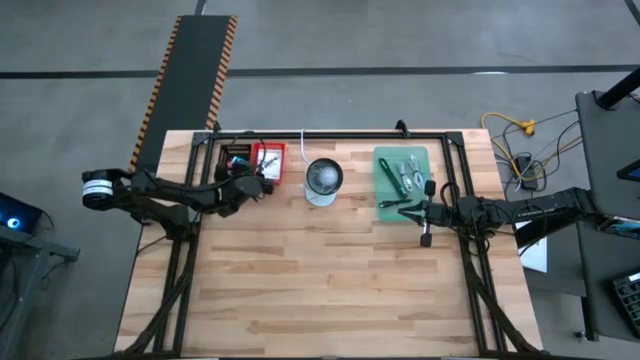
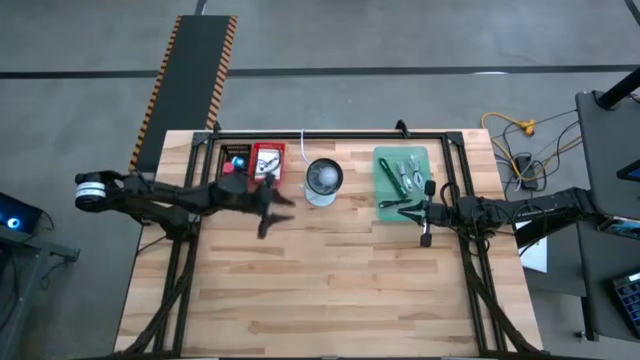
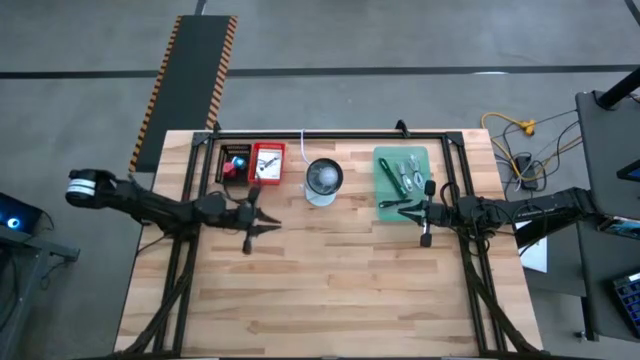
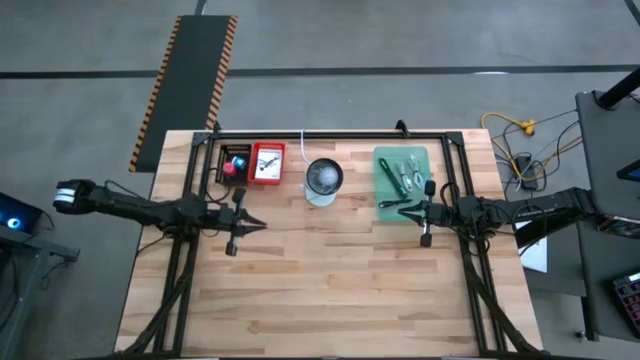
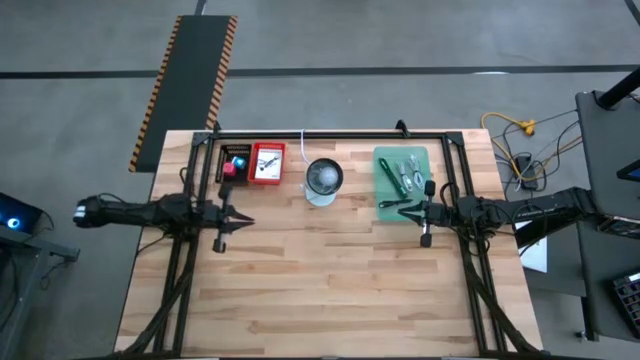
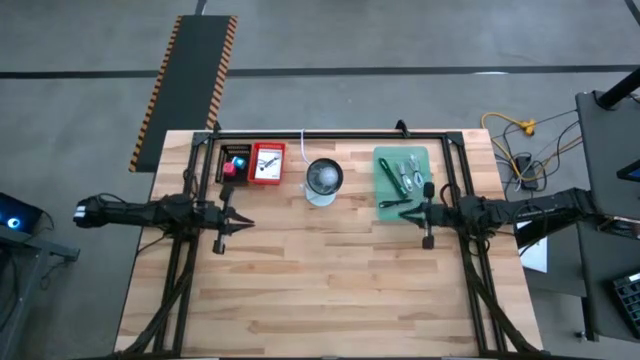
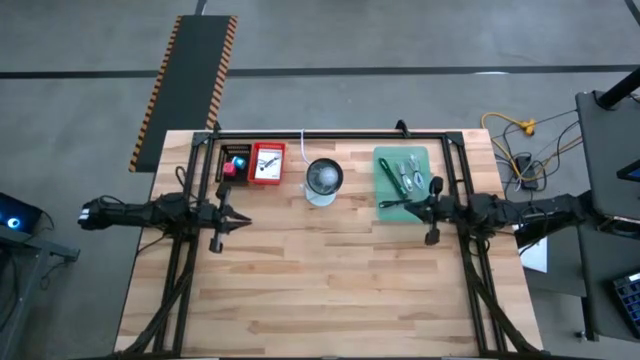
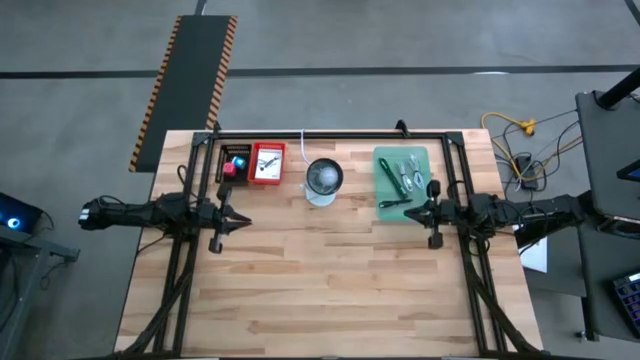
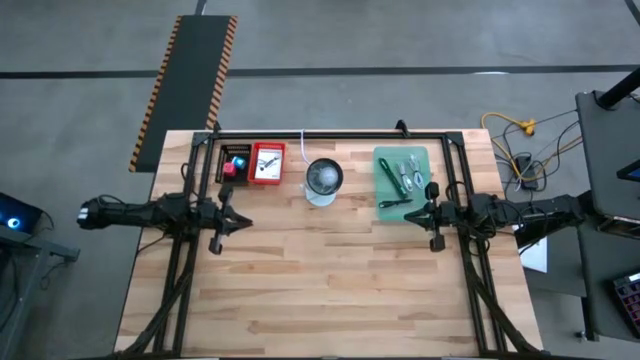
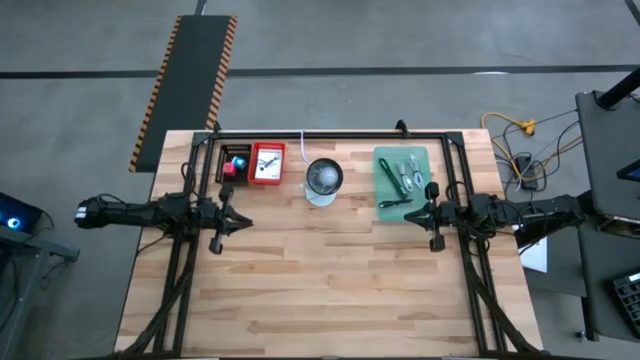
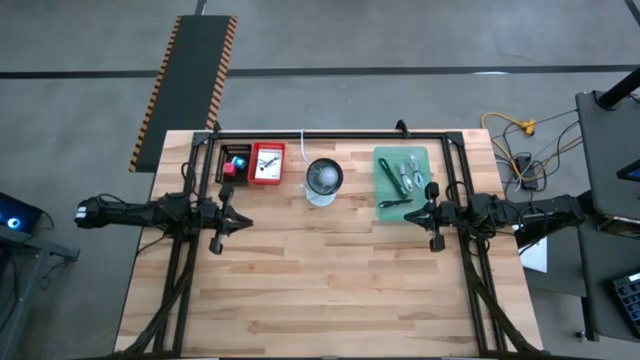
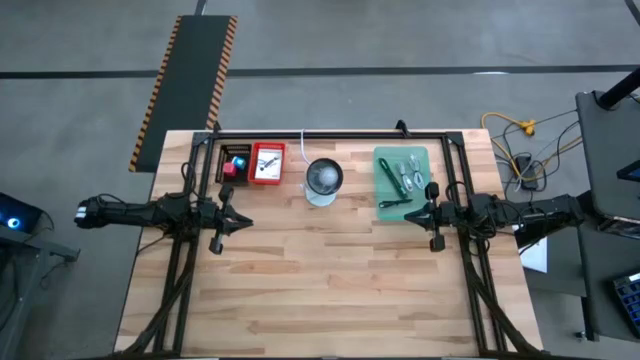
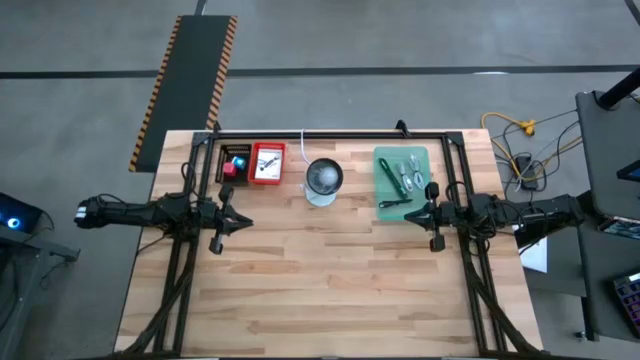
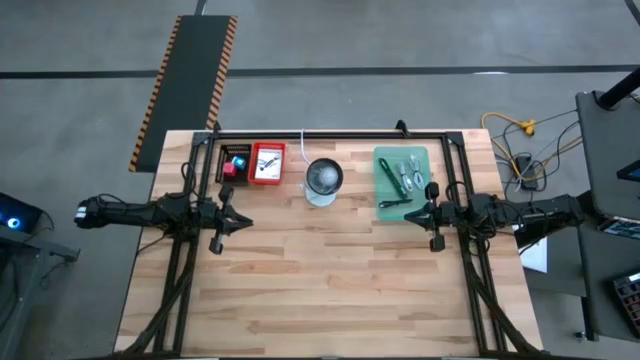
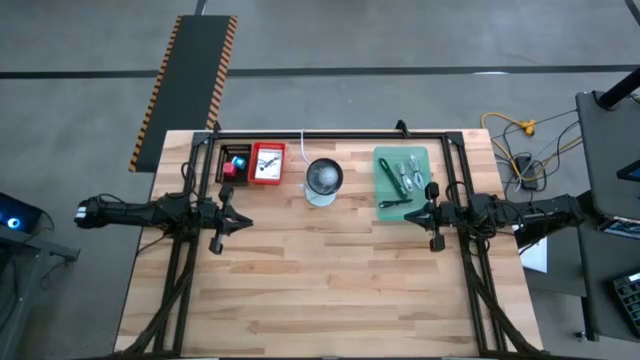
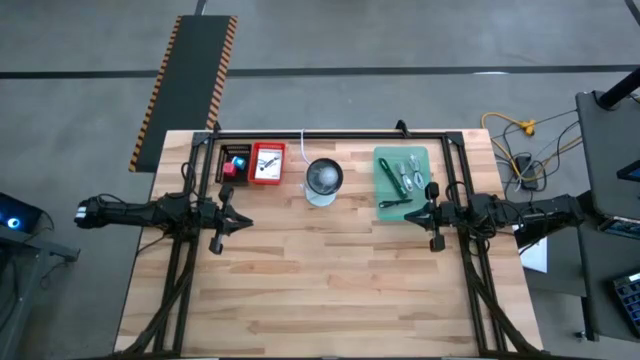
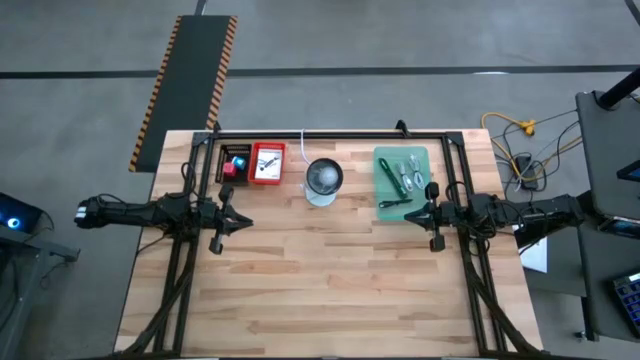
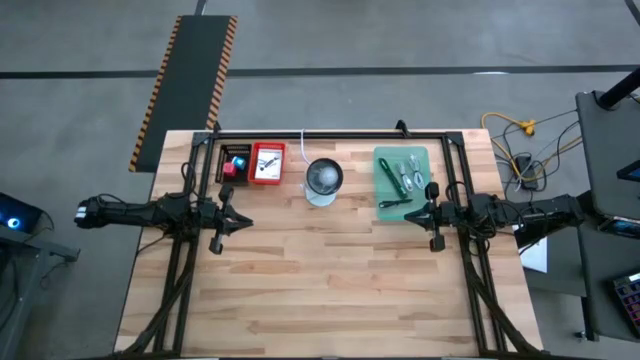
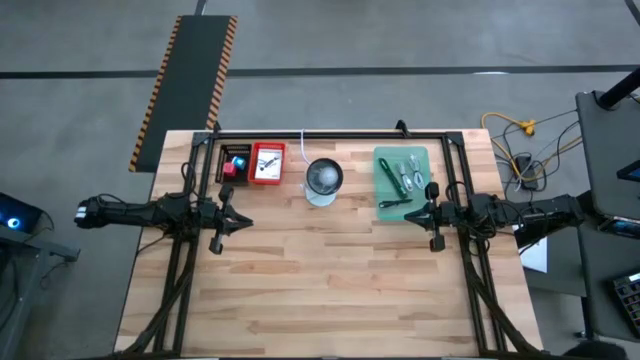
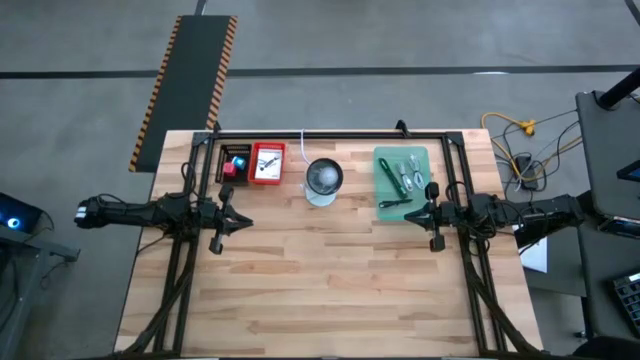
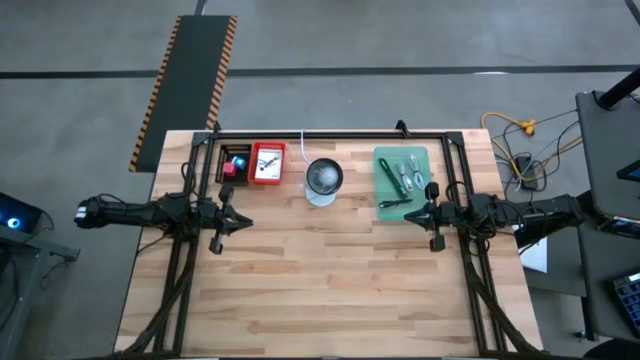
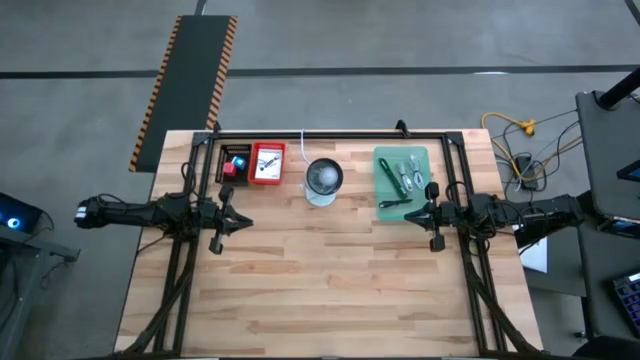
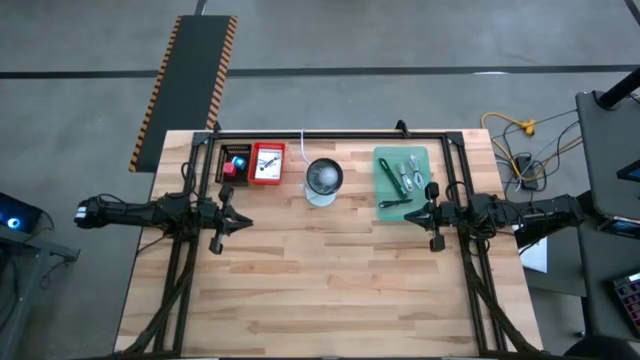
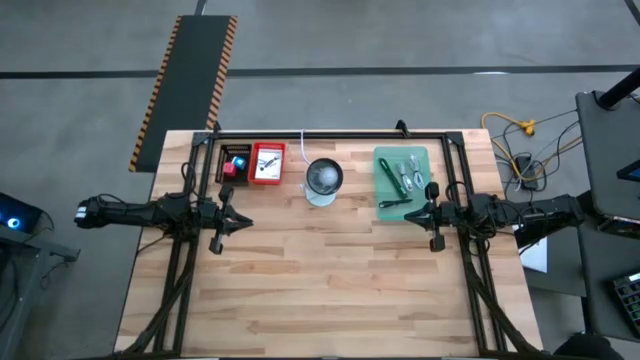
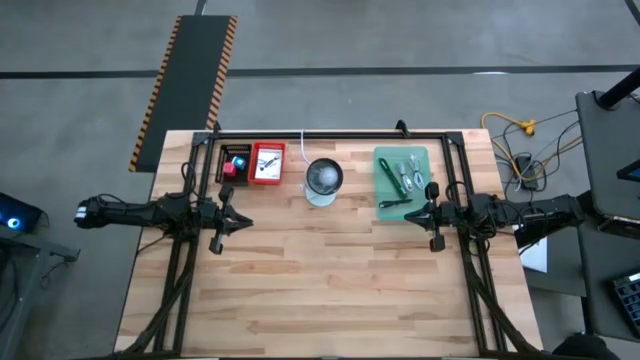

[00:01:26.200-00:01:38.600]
Task: Pick and place items into bin
Return to Home Position
